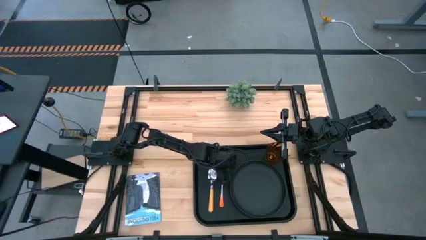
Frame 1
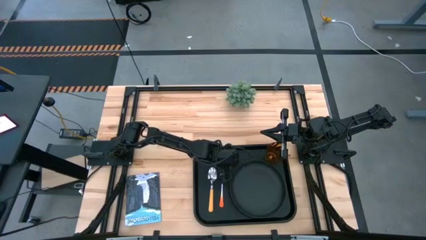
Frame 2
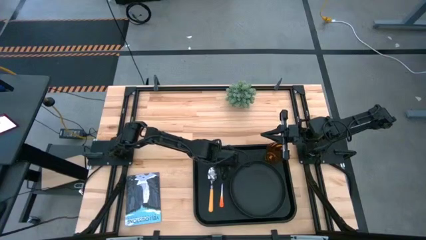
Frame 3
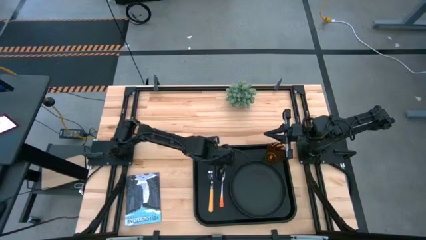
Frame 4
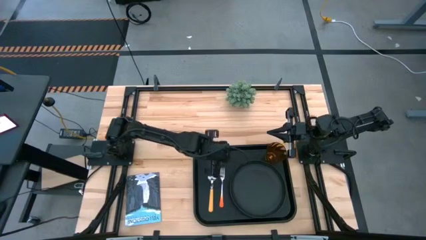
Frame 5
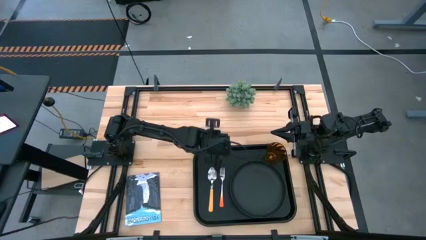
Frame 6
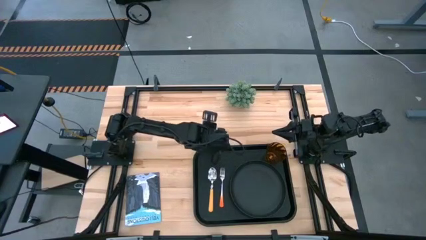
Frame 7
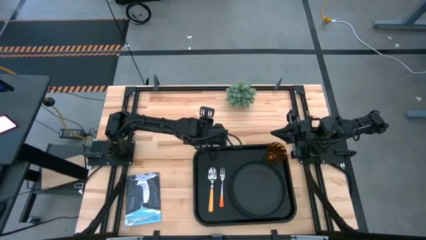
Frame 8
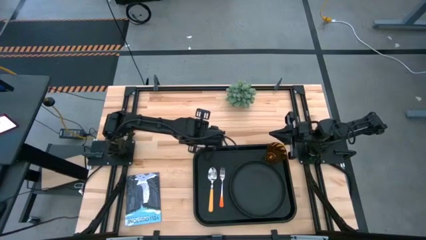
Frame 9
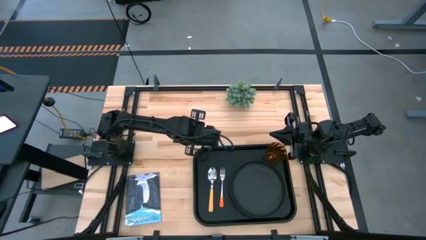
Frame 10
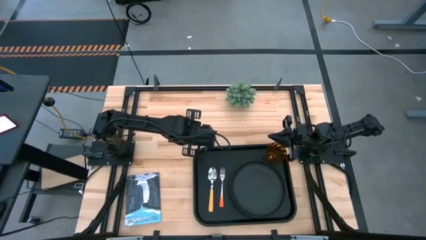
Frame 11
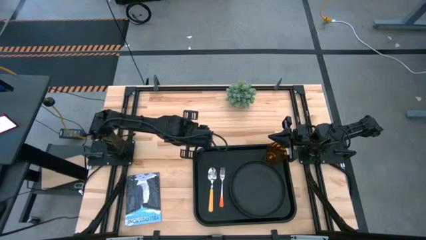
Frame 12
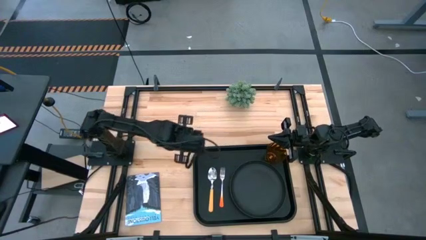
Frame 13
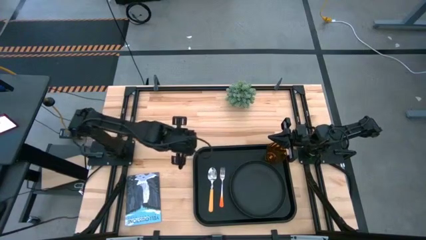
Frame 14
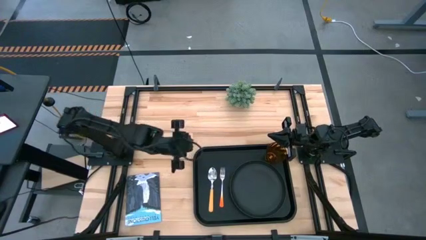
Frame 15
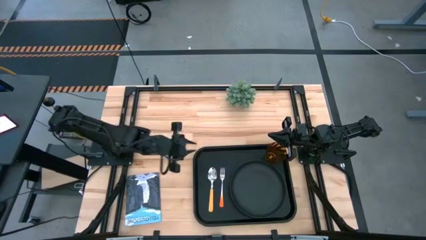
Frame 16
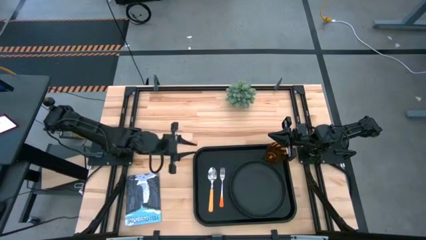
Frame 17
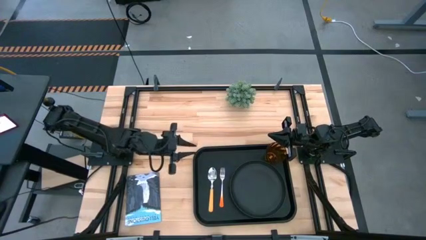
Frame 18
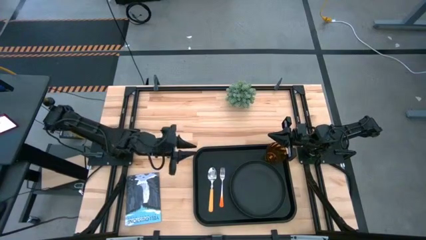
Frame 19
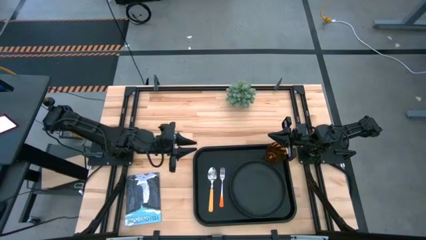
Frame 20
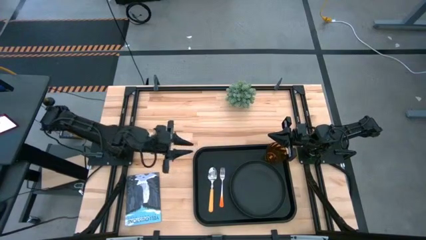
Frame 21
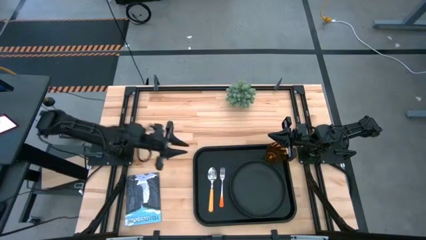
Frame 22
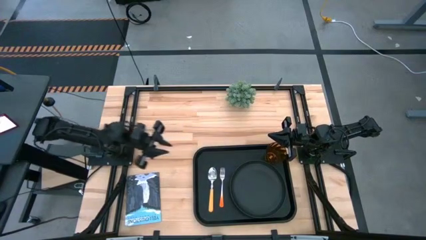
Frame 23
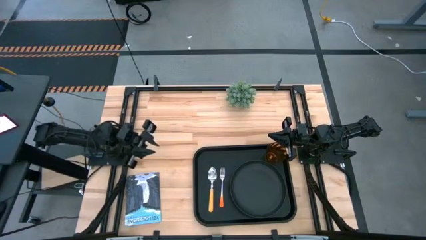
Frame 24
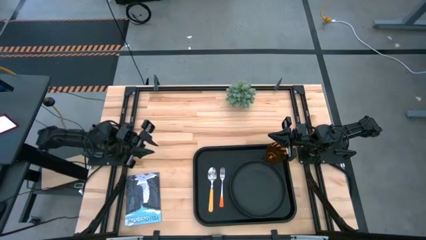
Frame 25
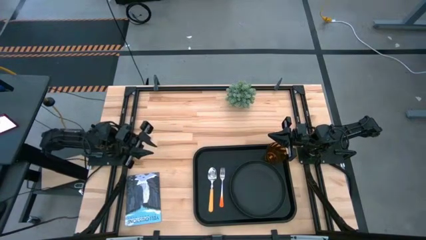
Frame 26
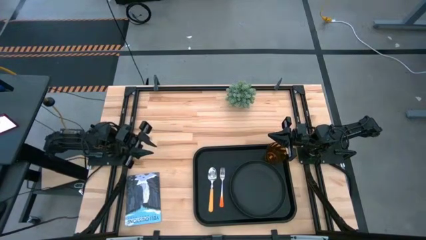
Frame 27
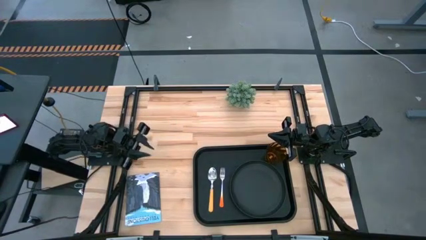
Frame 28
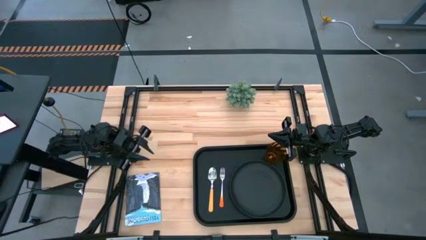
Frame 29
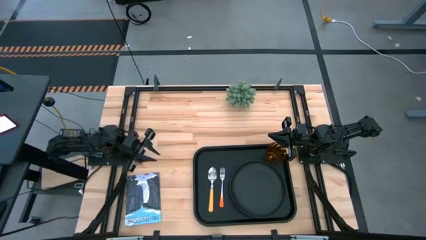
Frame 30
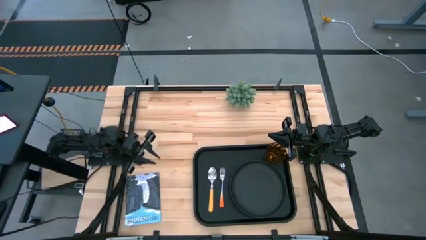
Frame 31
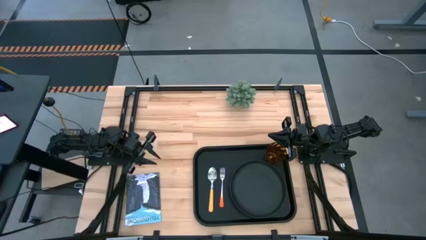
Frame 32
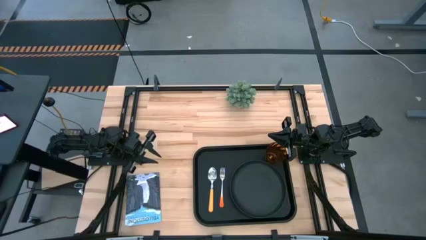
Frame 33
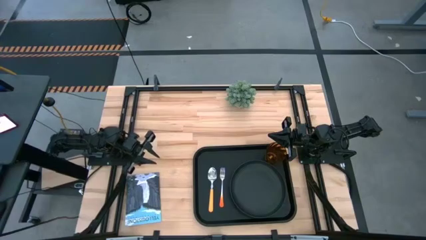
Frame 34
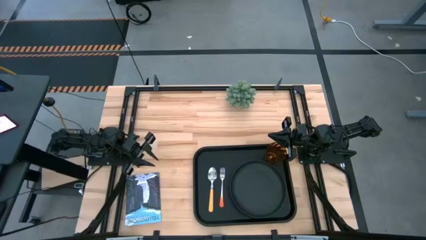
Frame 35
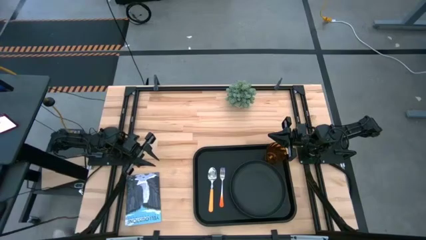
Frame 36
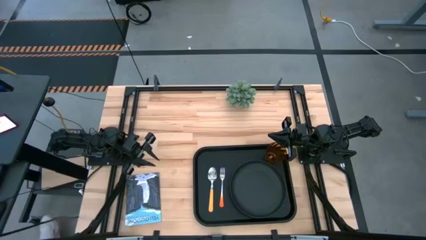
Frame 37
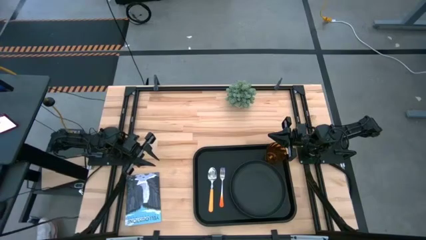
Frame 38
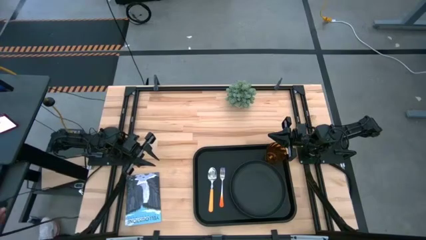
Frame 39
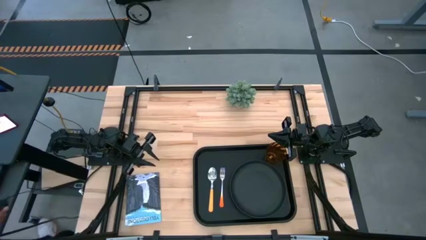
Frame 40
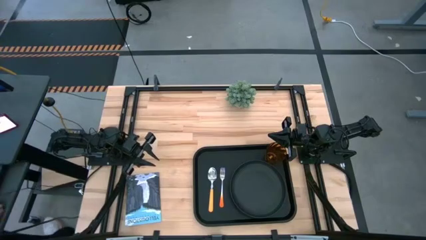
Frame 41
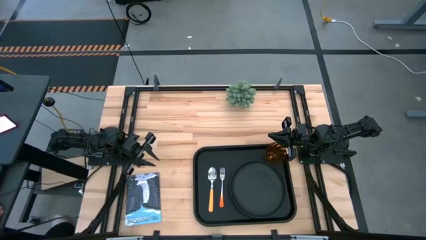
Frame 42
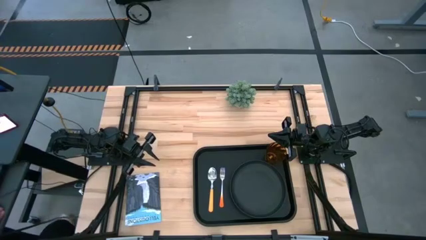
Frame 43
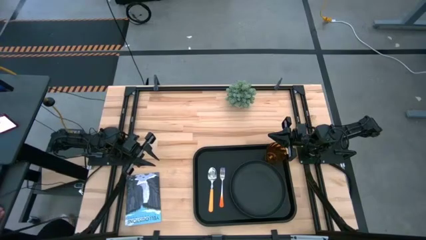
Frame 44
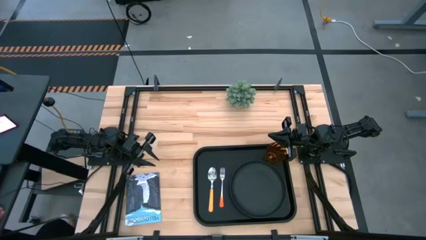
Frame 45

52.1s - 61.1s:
Task: Pick and place plate/cup/fork/spoon on tray
Return to Home Position

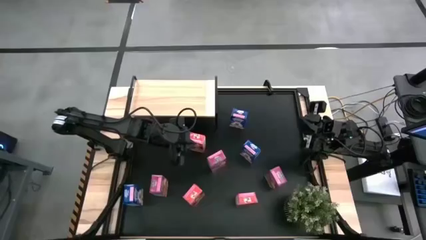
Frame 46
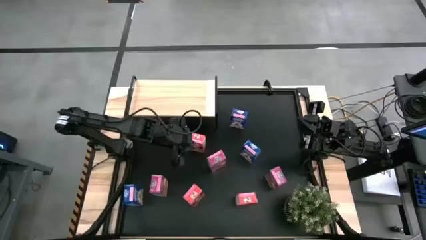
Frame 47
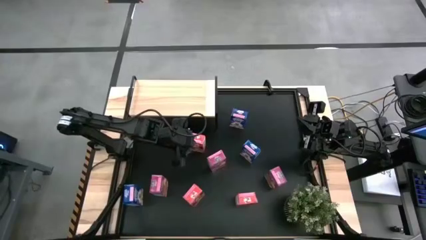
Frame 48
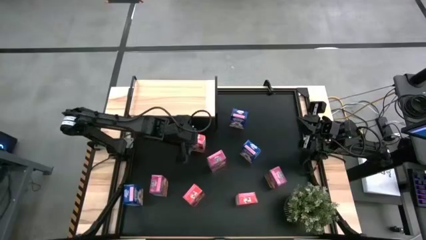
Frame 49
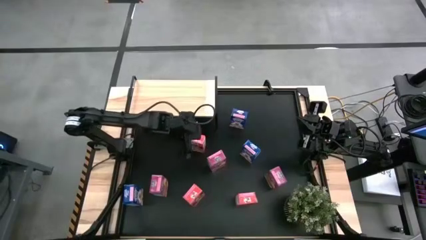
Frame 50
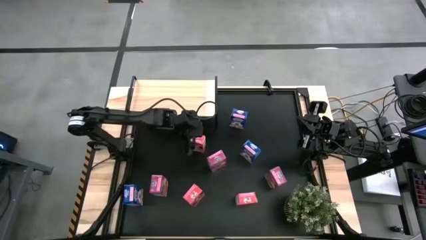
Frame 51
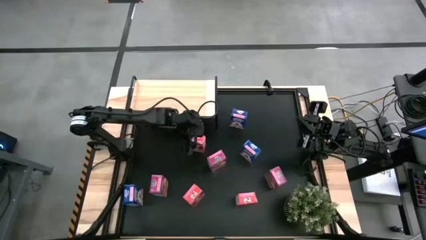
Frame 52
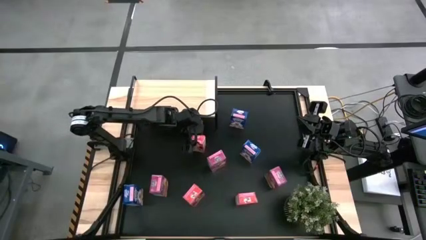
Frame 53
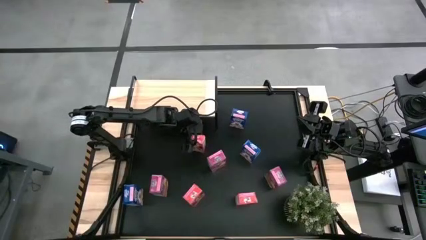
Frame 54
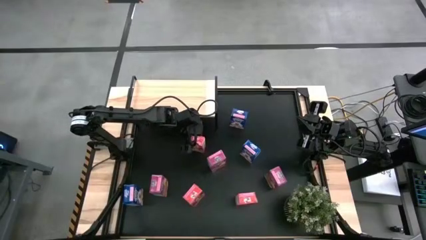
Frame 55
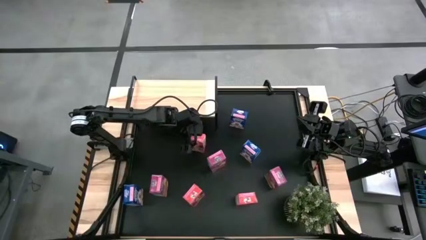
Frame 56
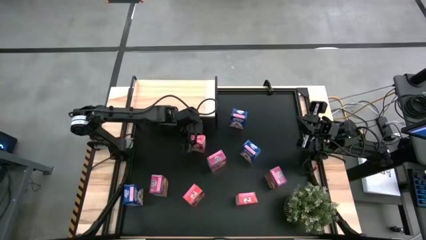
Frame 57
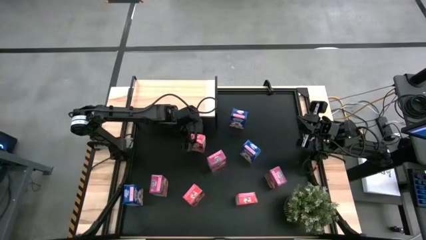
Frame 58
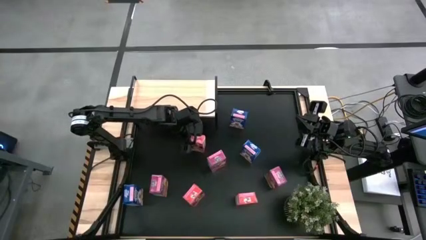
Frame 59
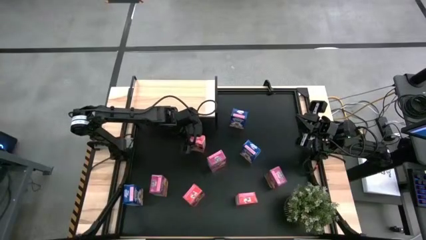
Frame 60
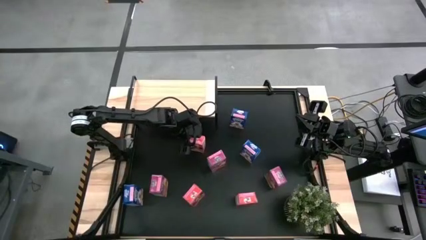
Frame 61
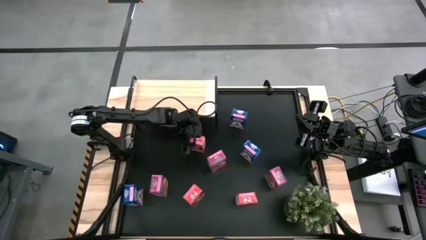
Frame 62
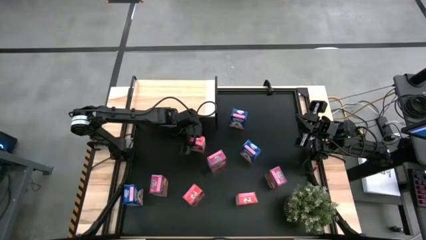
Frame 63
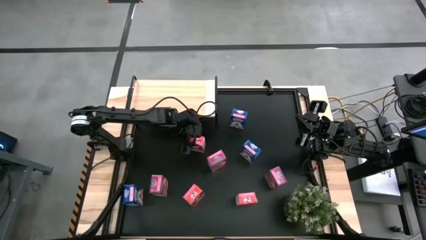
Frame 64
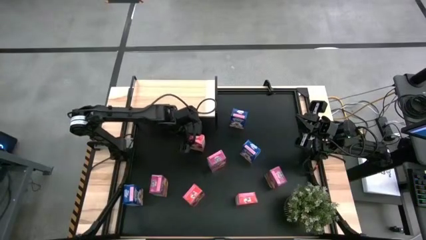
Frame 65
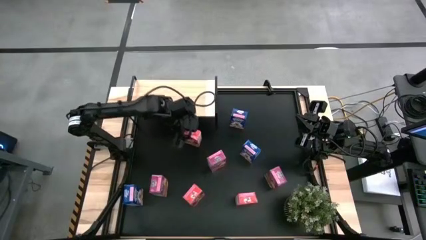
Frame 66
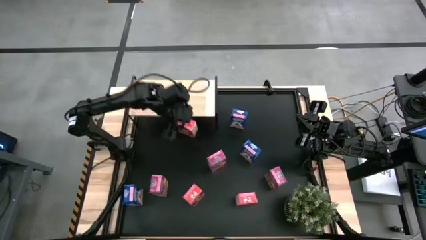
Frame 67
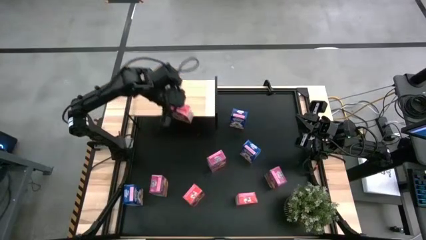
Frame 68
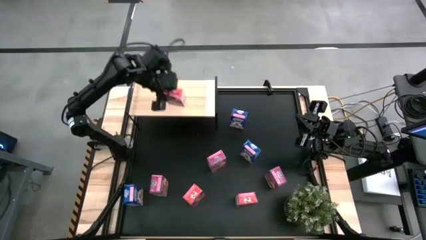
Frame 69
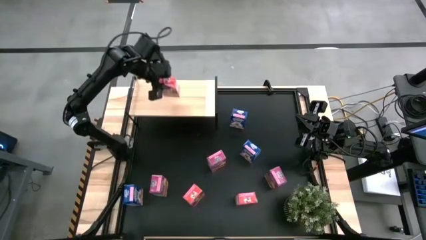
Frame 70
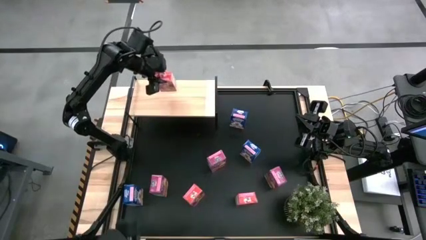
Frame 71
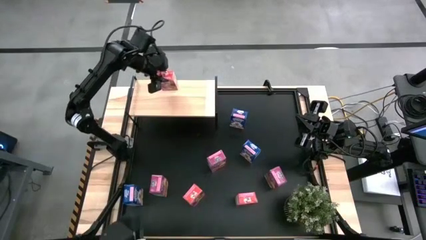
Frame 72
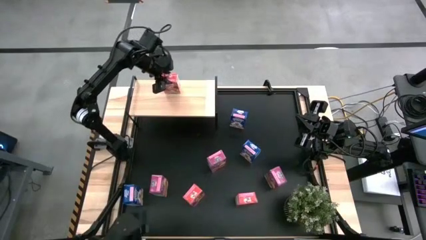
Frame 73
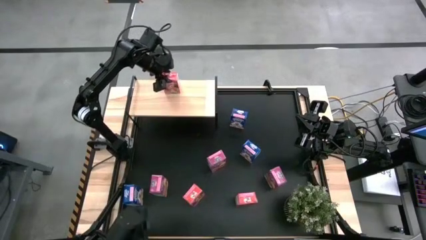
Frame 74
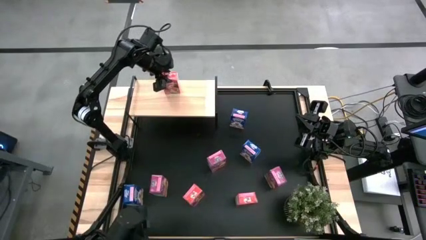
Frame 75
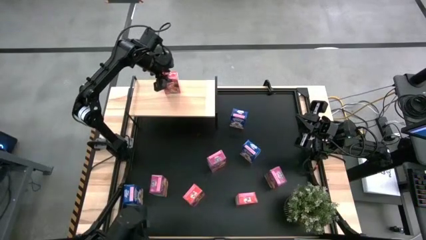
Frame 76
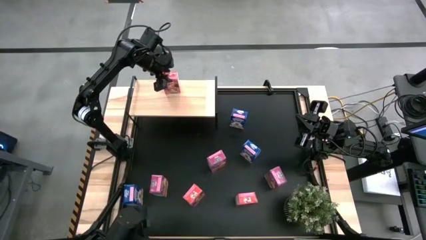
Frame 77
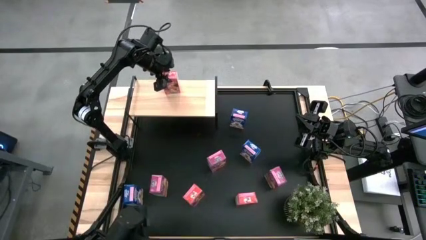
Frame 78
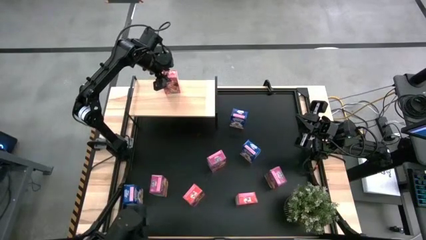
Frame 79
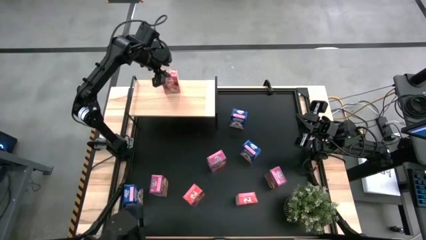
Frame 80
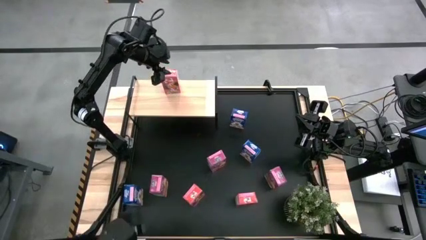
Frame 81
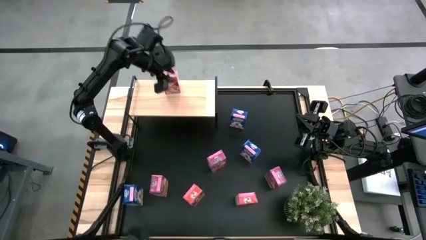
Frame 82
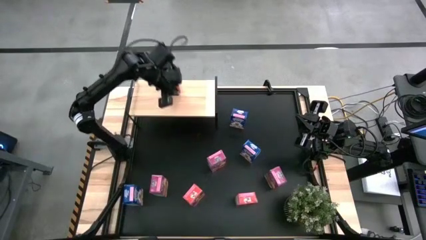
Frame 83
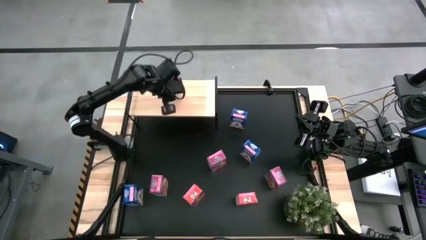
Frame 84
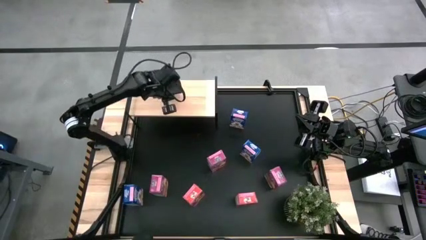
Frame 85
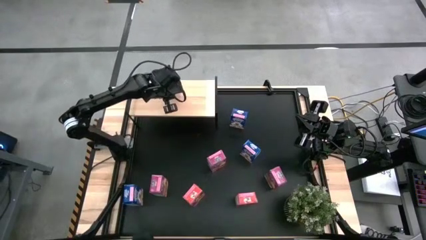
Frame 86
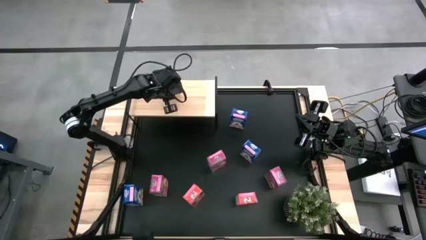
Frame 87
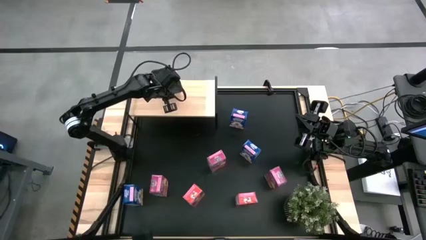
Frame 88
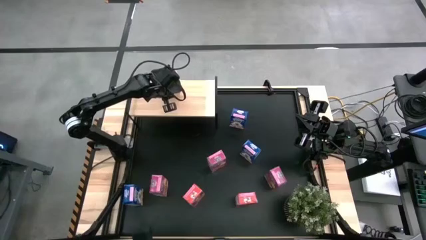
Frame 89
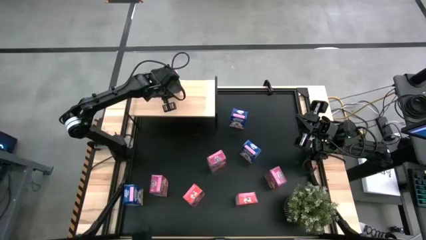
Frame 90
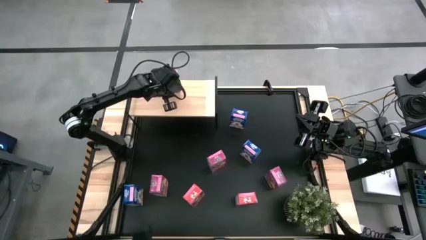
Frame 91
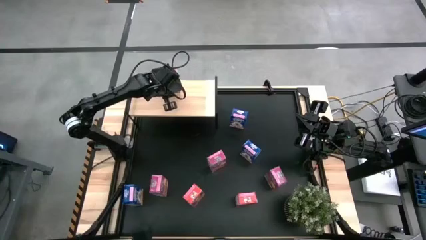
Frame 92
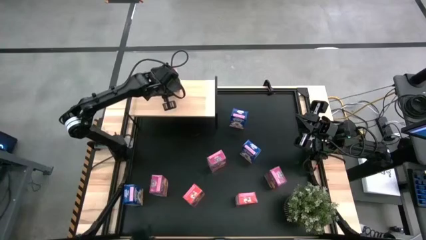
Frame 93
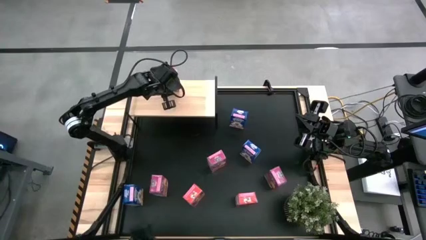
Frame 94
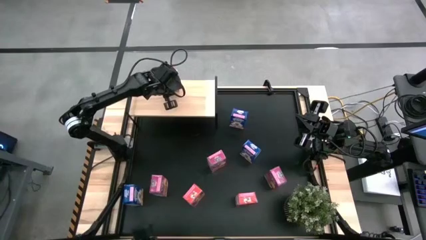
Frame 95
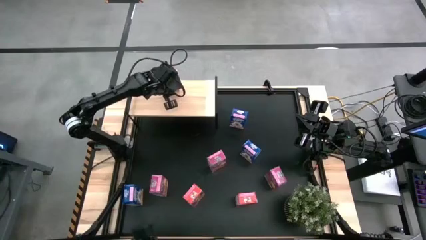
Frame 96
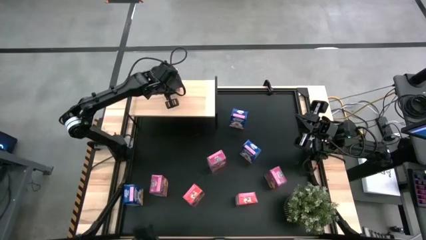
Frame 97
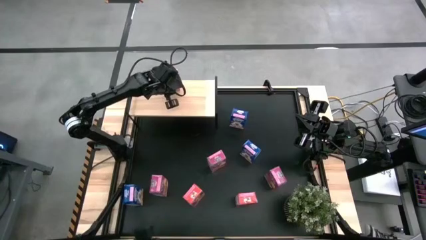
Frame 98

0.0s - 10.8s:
Task: Stack cereal on shelf
Put the top red cereal box on the shelf
